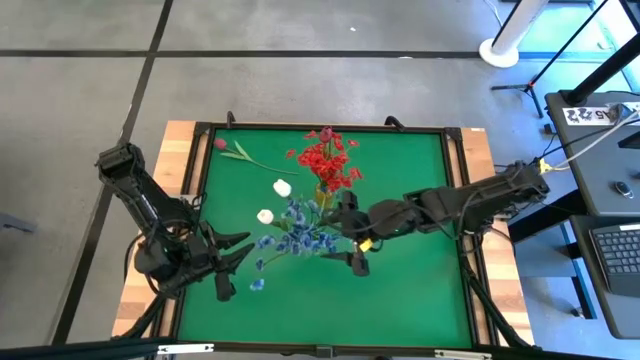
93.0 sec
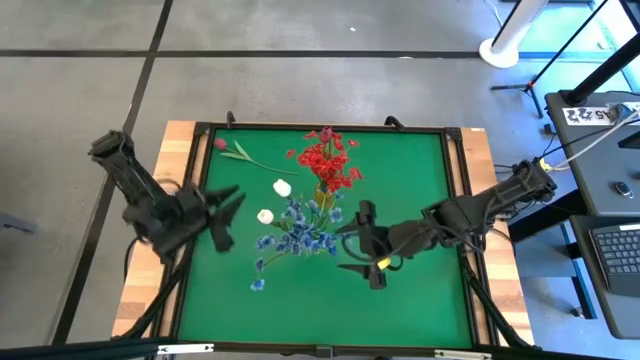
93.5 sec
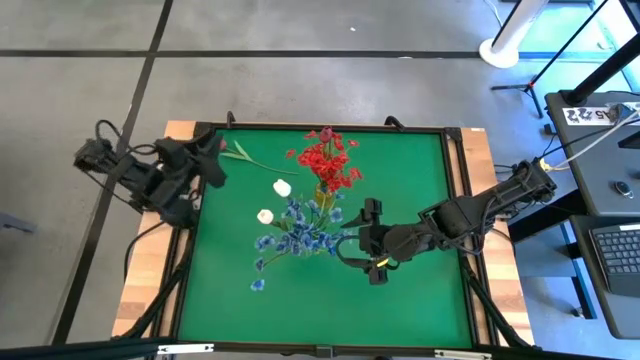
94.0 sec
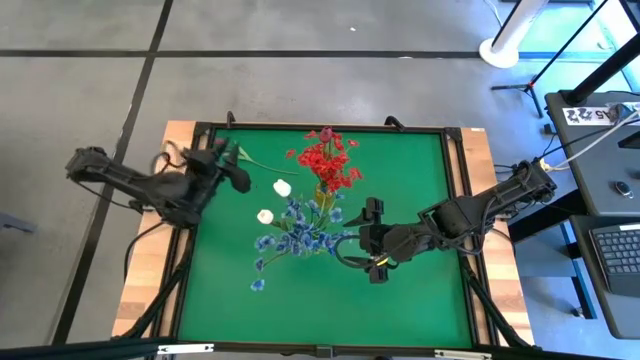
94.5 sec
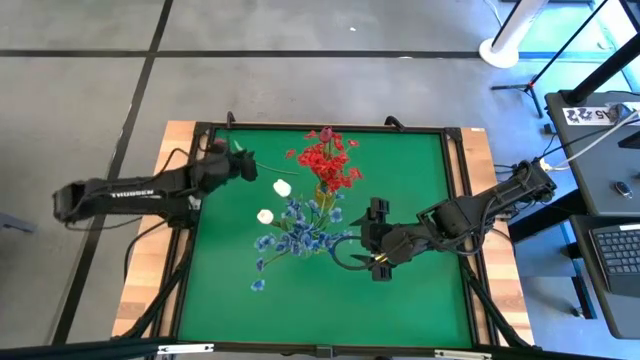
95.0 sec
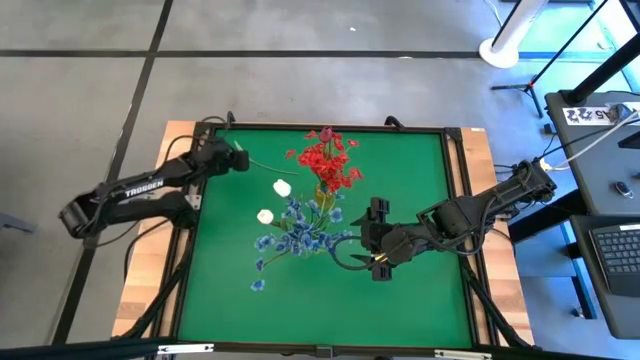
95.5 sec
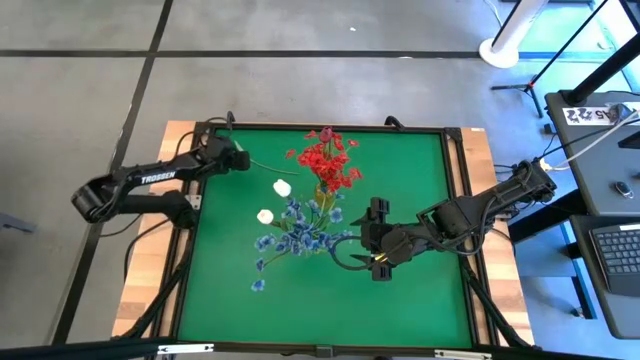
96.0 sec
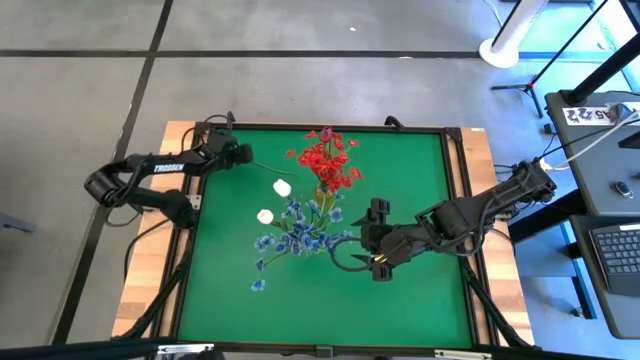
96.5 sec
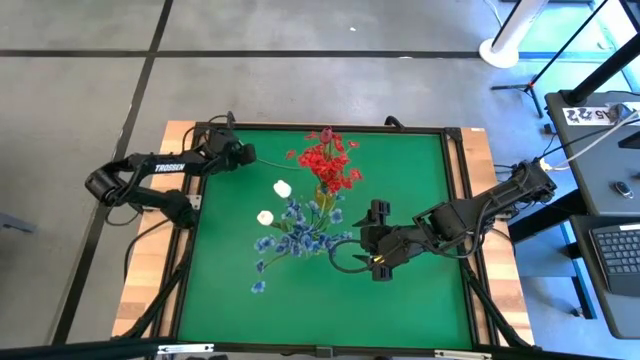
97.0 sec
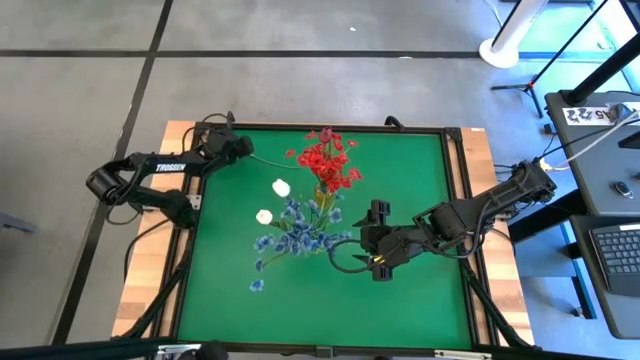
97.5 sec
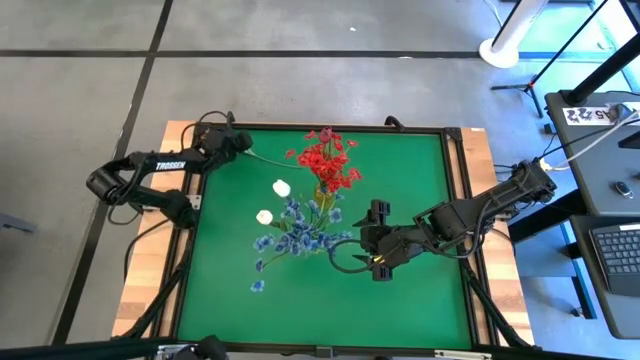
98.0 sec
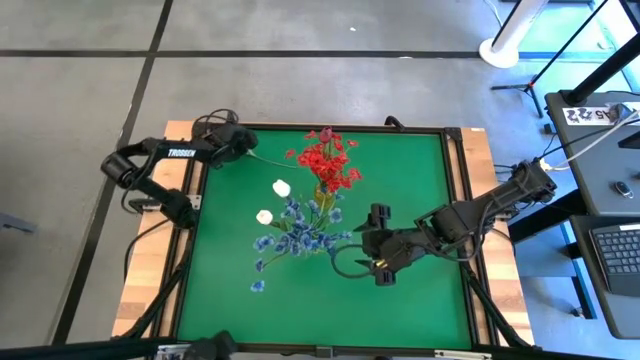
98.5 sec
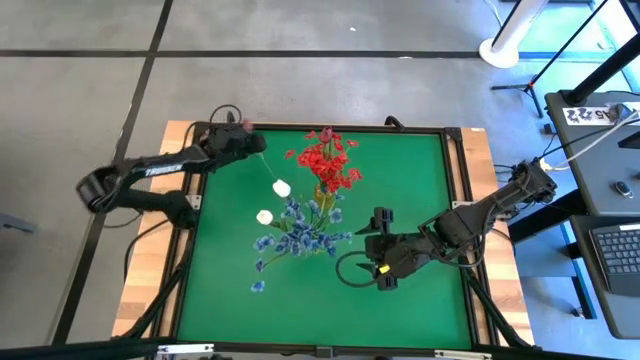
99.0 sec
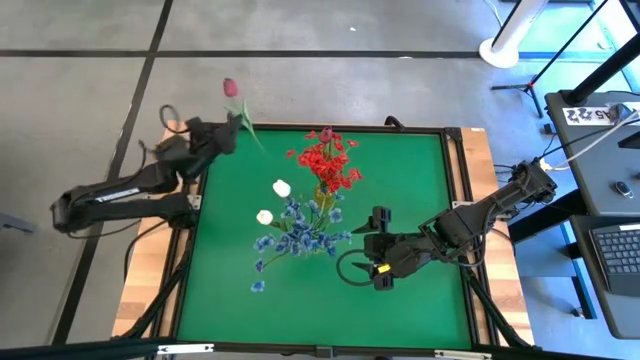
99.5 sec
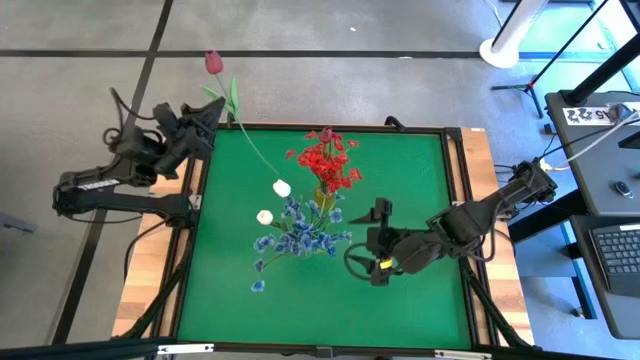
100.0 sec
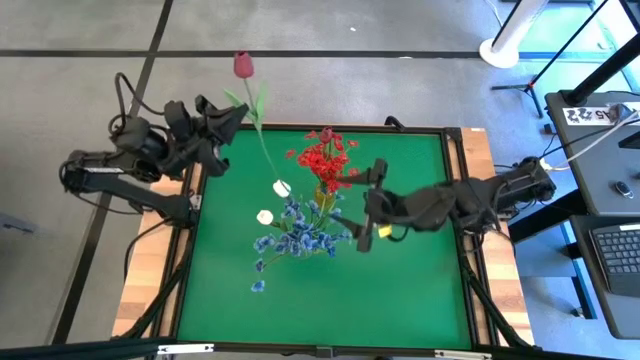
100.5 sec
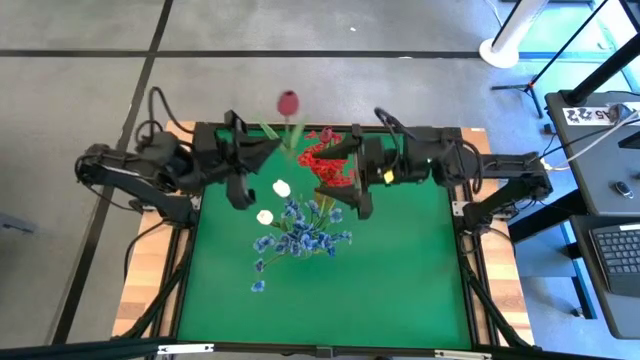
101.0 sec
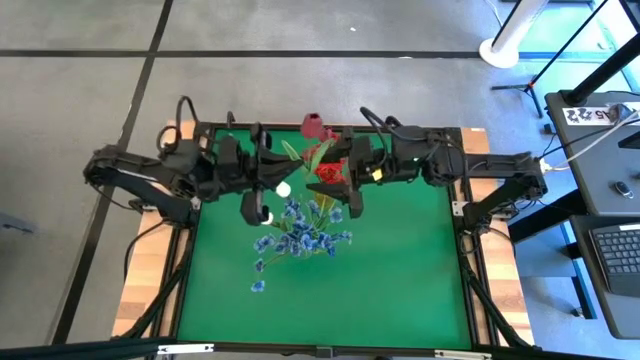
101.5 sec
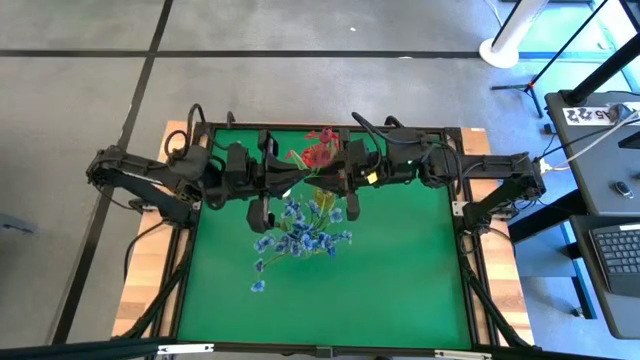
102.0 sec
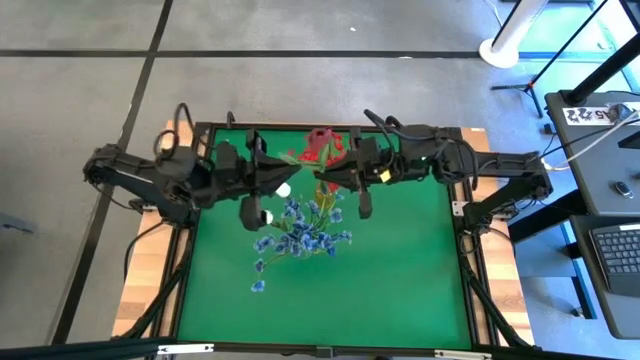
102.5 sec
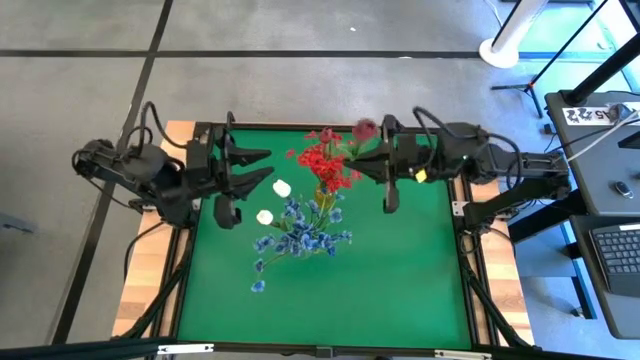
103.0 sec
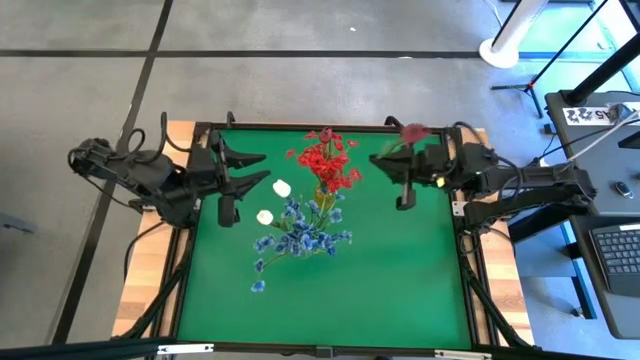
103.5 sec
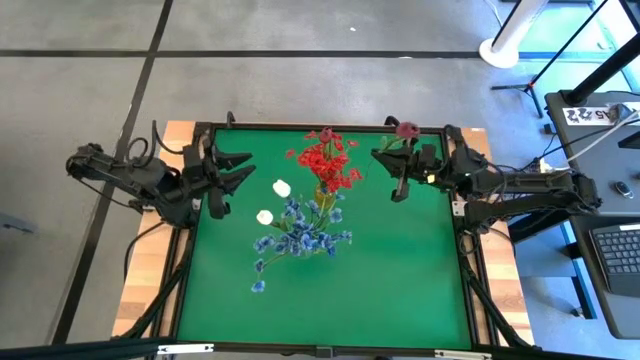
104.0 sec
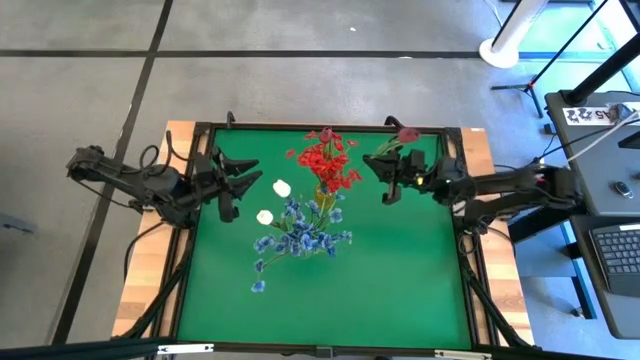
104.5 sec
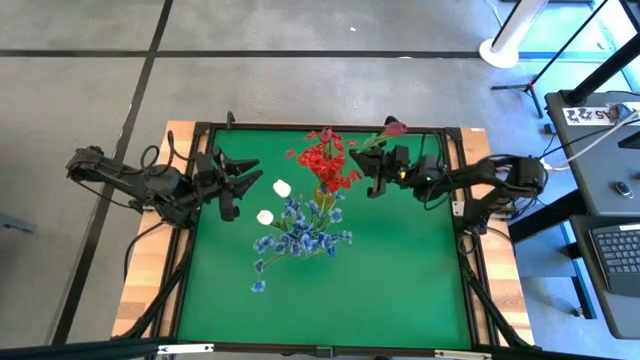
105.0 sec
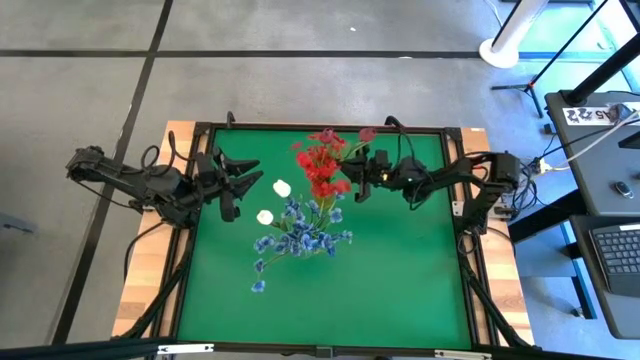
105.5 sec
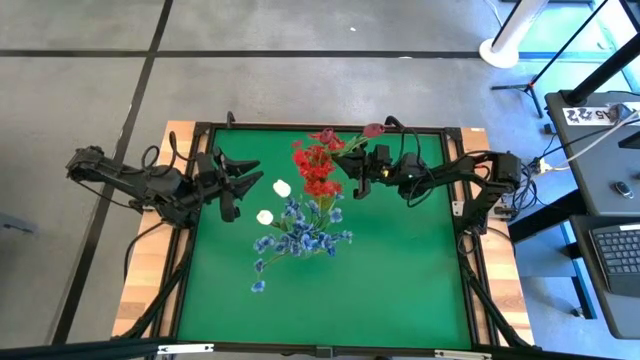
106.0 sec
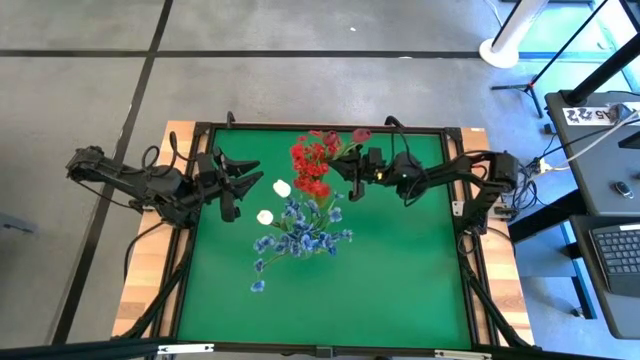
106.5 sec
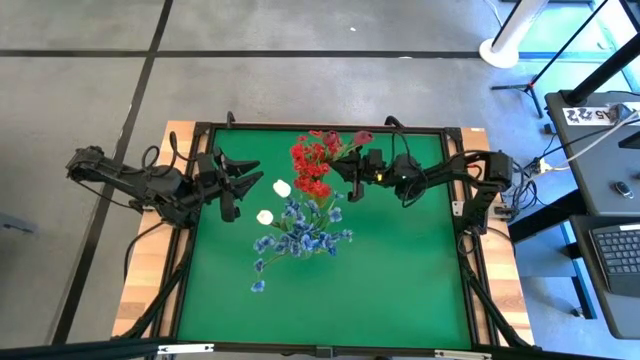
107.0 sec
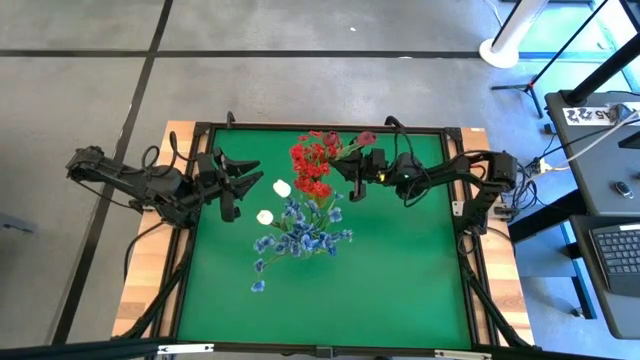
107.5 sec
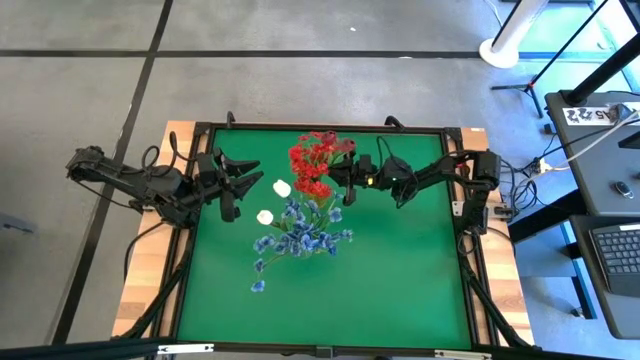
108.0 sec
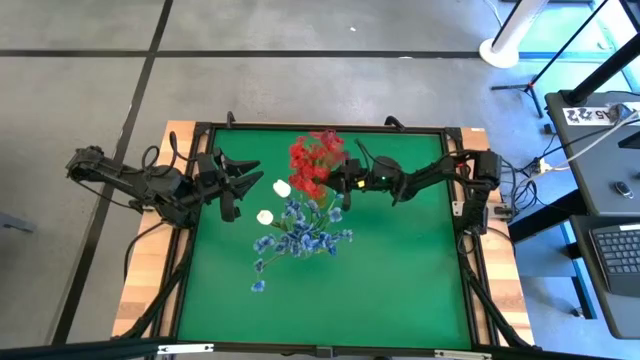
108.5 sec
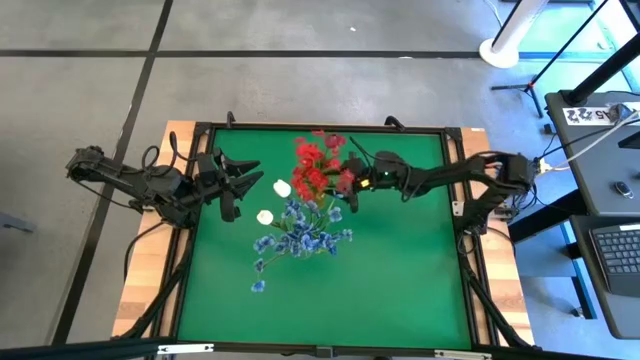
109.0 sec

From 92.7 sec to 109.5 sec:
Task: Sort flowers into vase by color
Put the red flower into the yellow flower vase

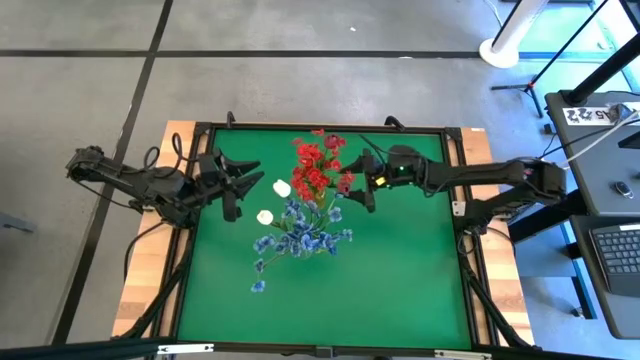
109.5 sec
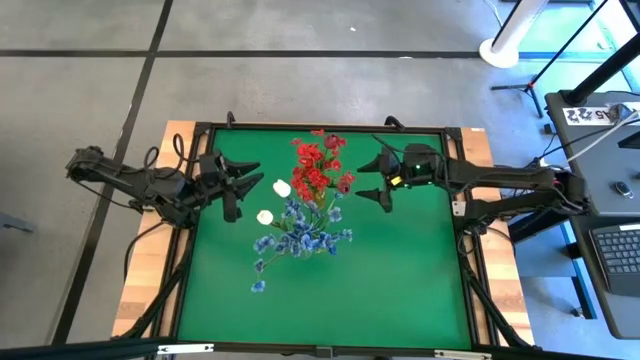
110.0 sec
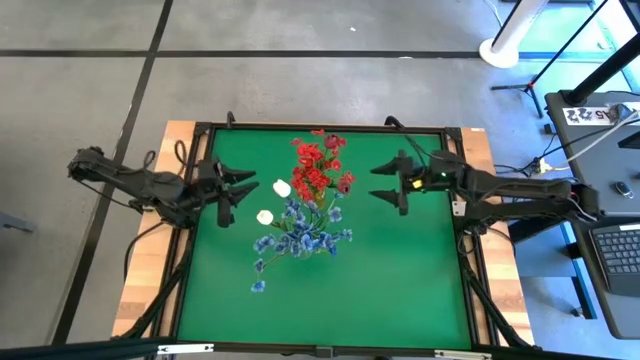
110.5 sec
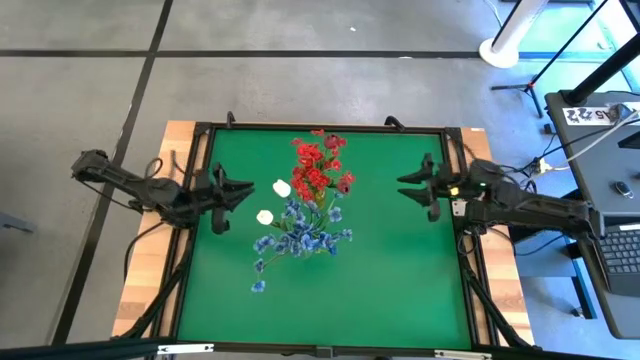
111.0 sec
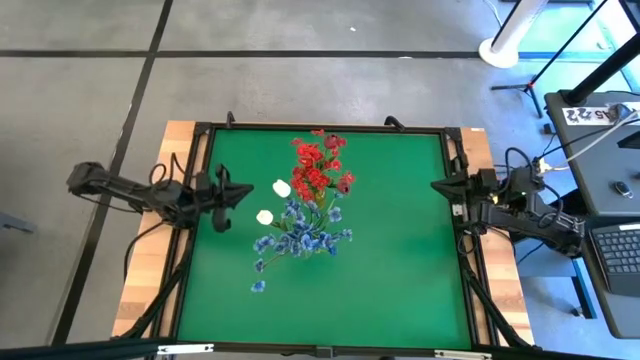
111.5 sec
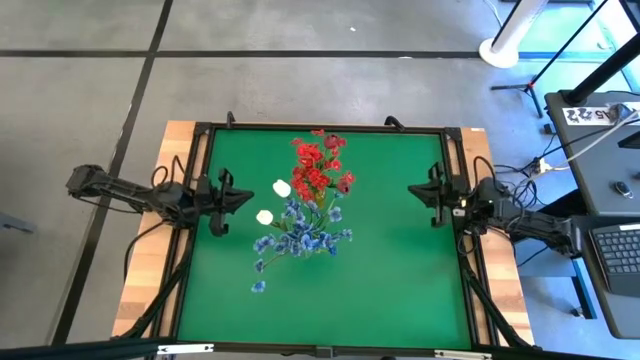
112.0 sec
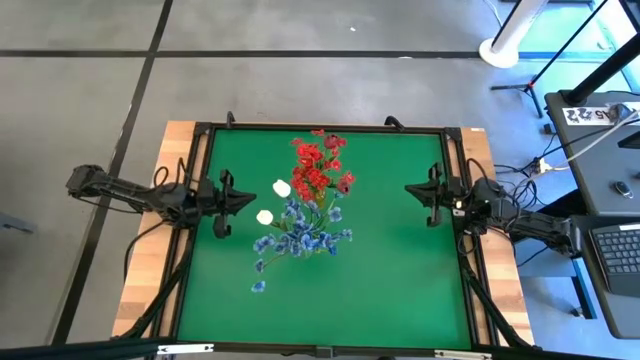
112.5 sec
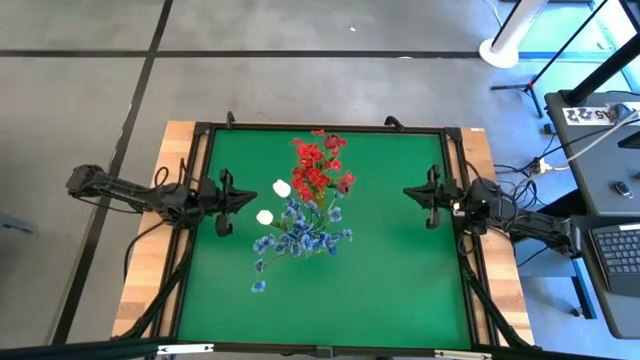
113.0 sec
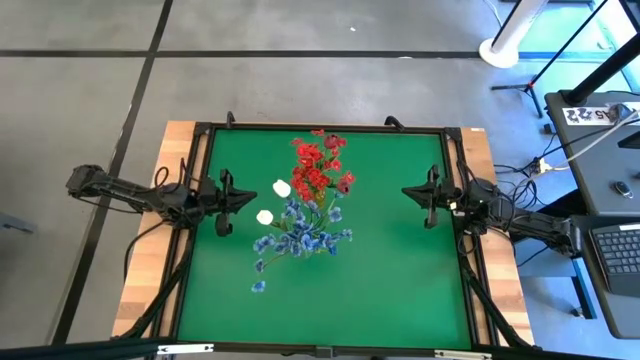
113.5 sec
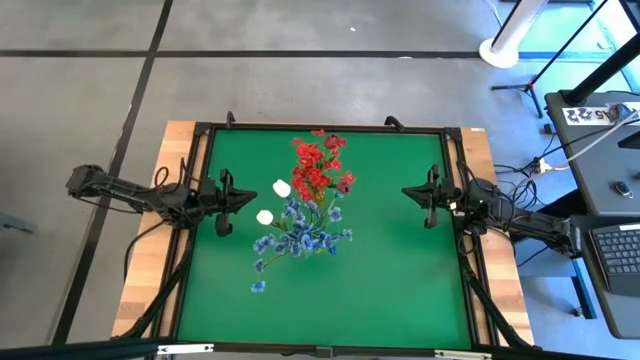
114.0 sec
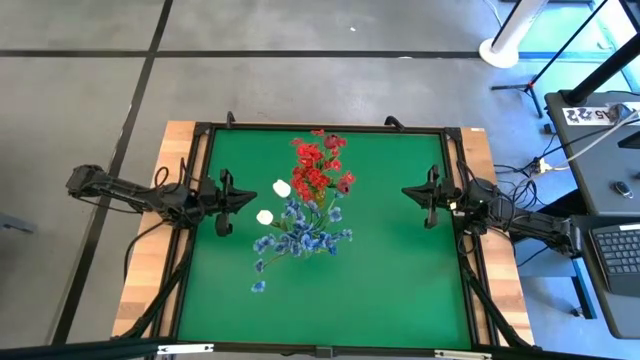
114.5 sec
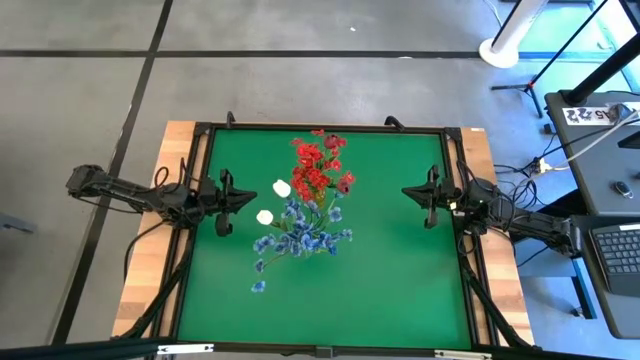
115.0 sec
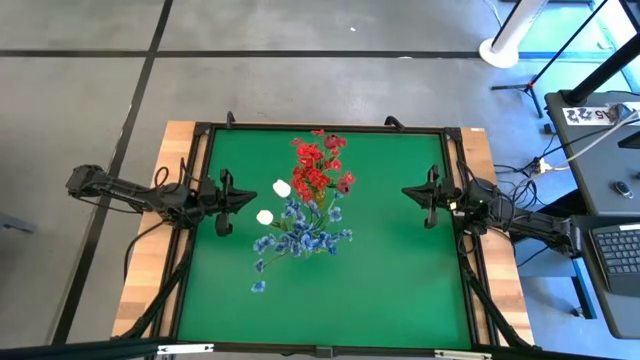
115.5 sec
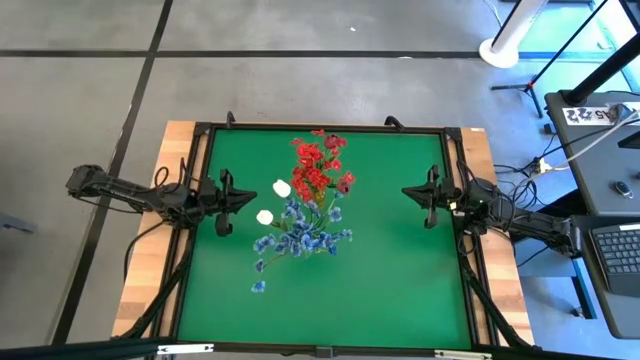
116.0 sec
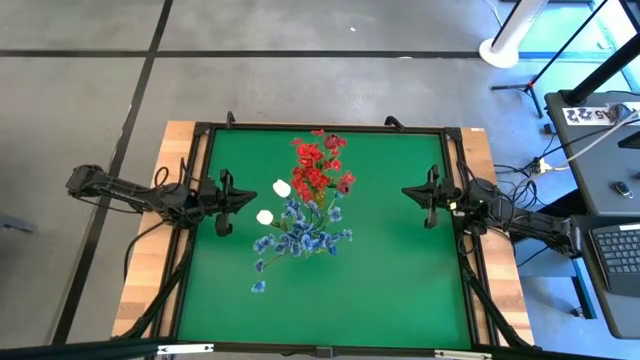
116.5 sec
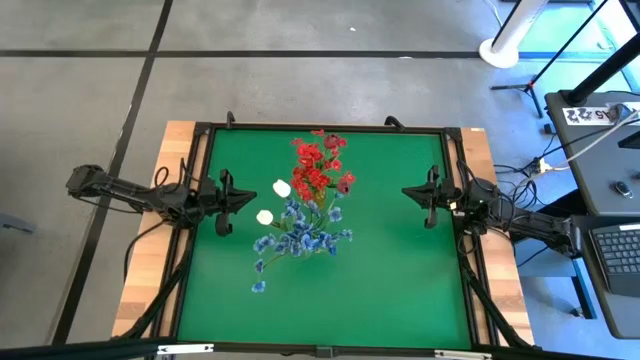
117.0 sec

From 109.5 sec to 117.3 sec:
Return to Home Position
